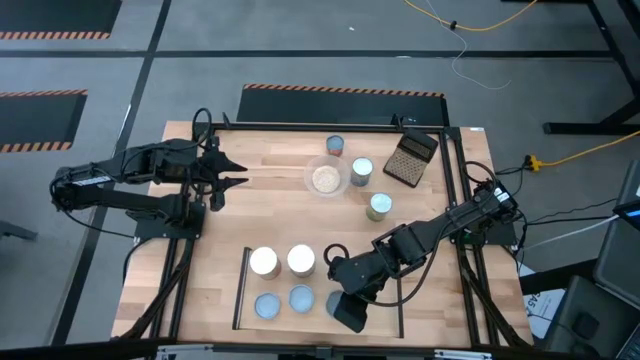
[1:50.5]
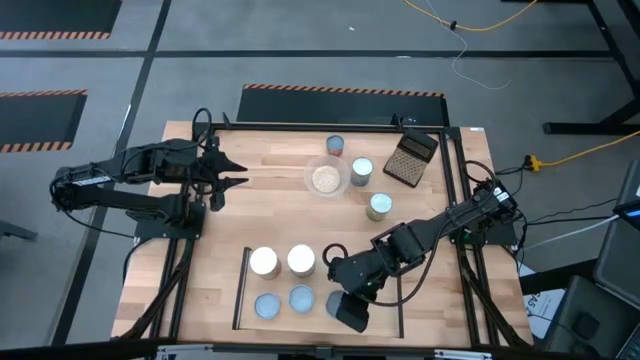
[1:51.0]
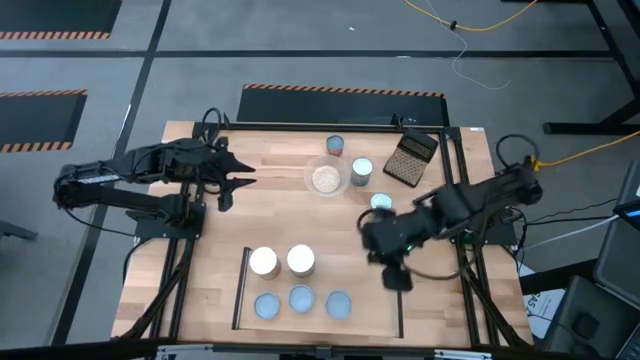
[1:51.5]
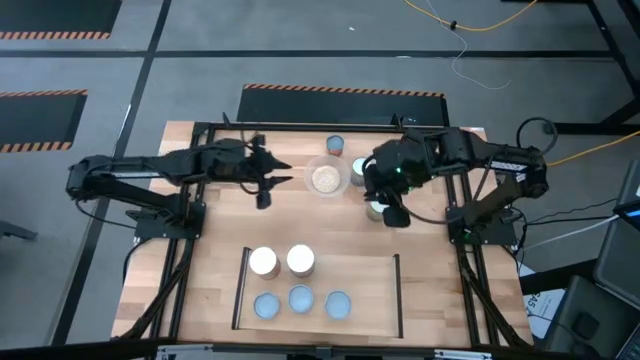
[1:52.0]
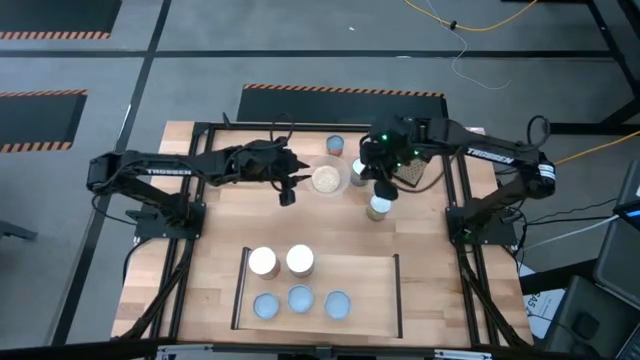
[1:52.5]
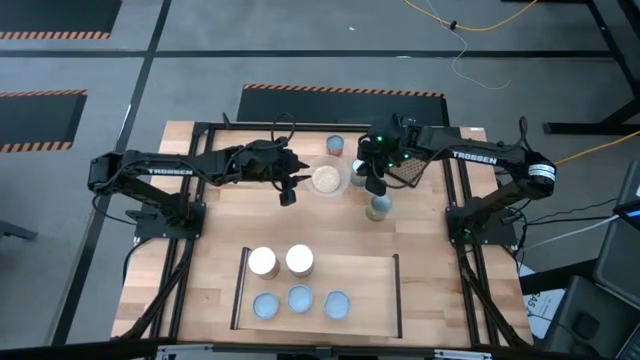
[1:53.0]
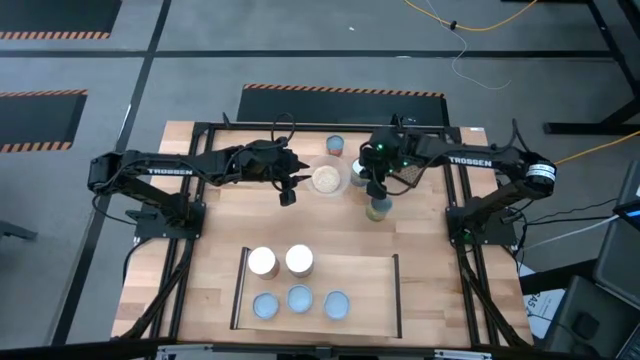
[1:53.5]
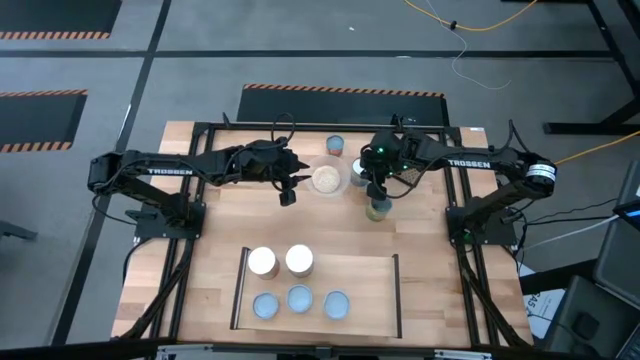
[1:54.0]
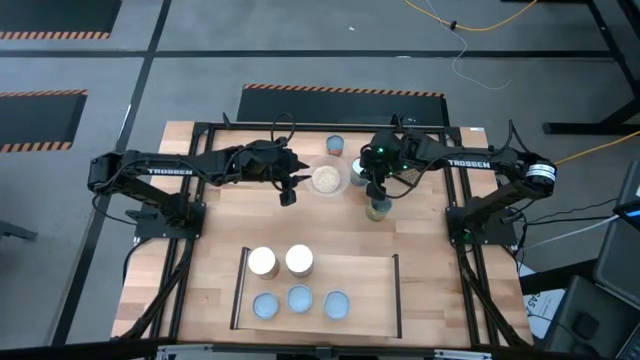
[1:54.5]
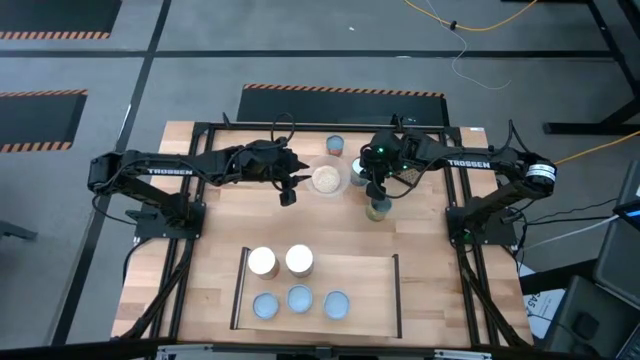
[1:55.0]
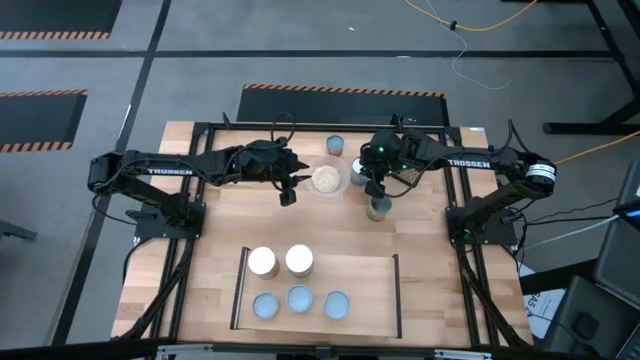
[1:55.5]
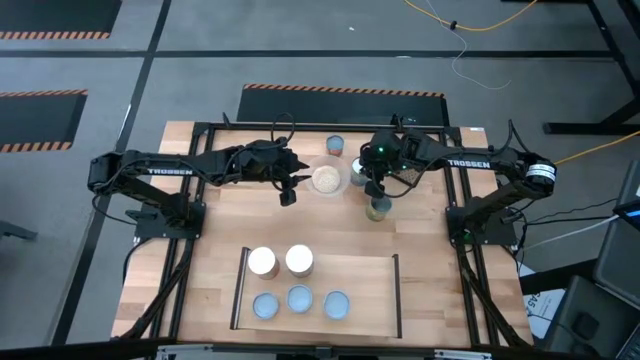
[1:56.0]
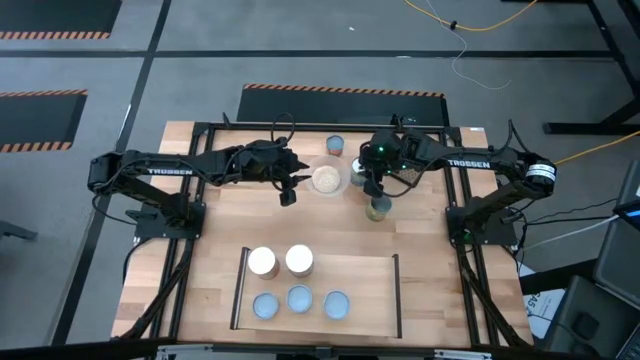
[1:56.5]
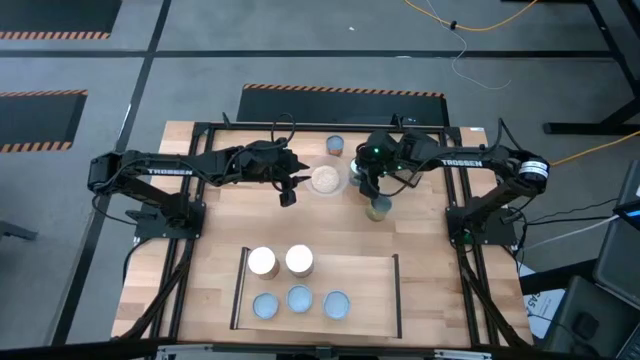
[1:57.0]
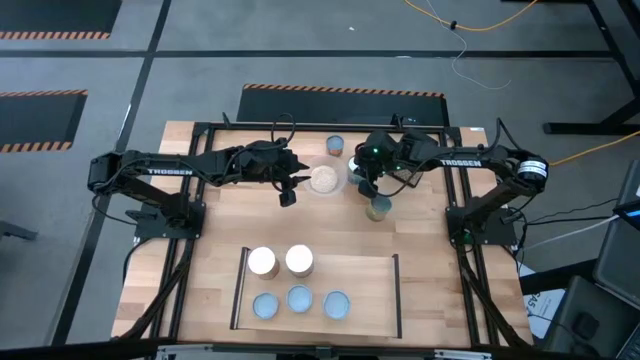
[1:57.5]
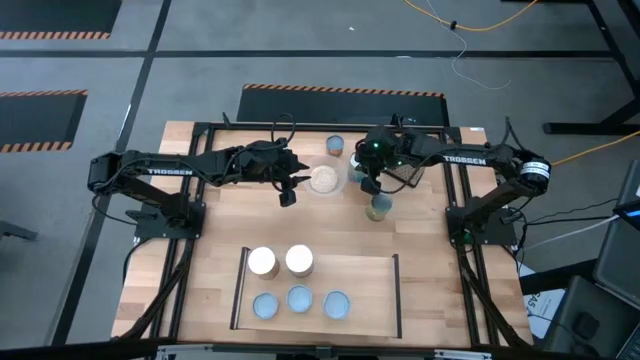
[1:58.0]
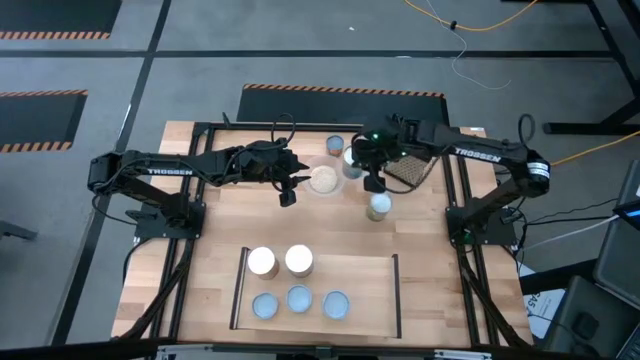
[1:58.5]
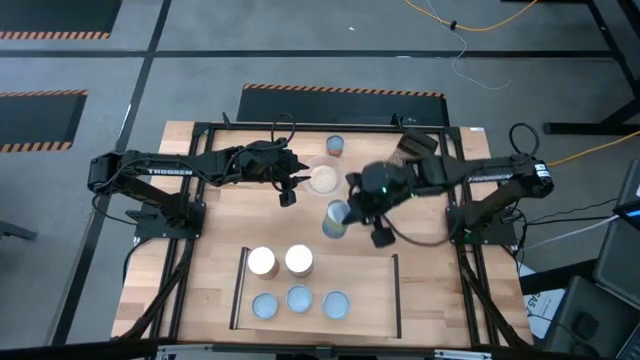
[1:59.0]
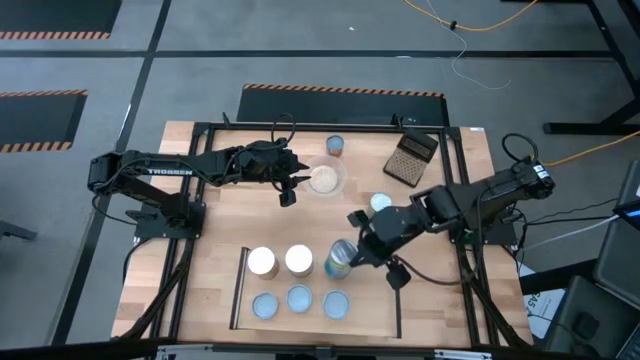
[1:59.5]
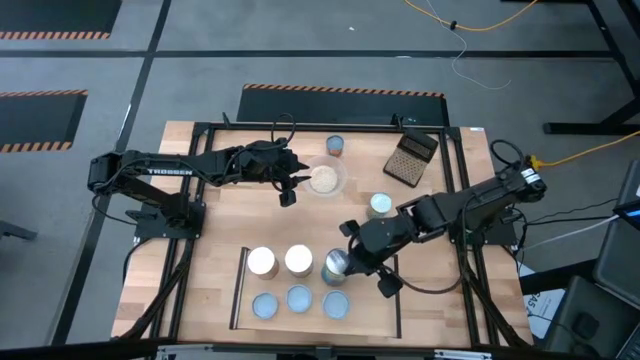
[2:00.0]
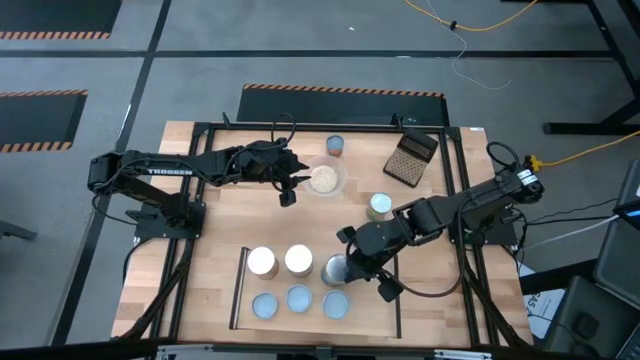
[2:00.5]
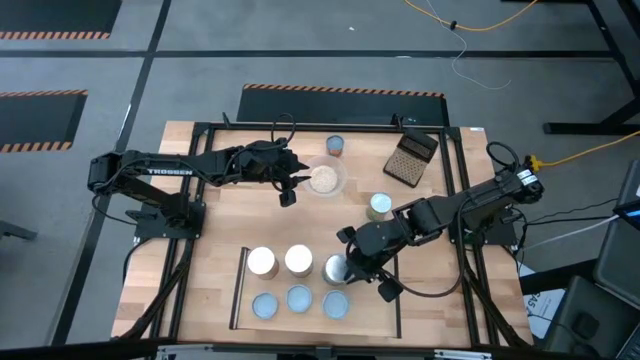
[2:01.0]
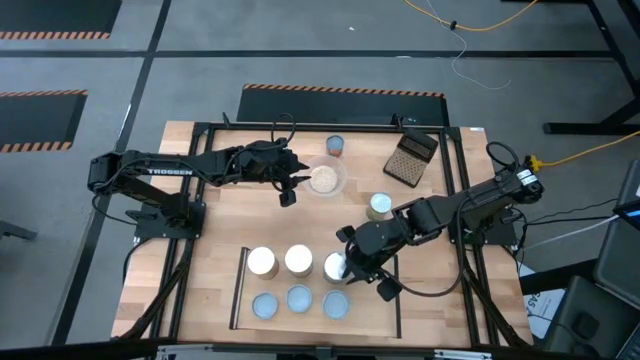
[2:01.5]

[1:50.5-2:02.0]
Task: Pick and place cans onto a shelf
Put the canned cherries on the shelf

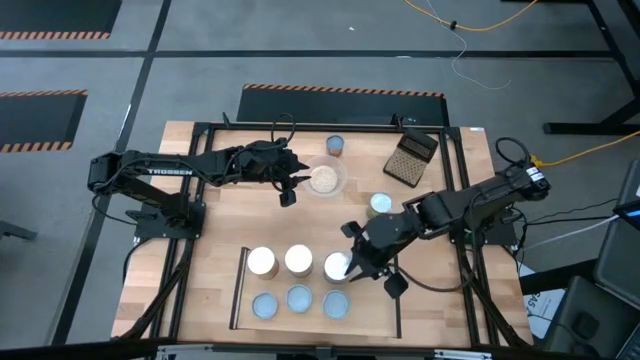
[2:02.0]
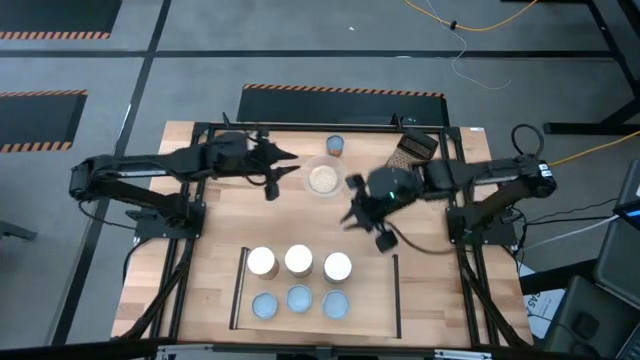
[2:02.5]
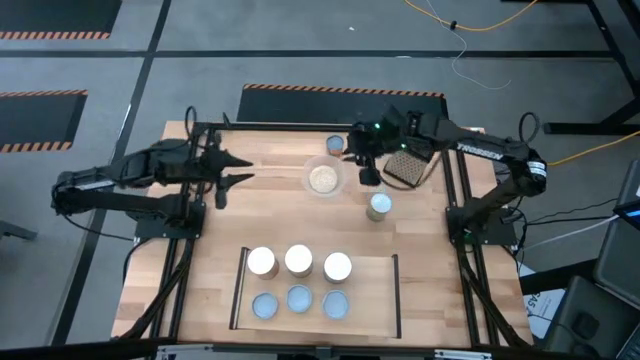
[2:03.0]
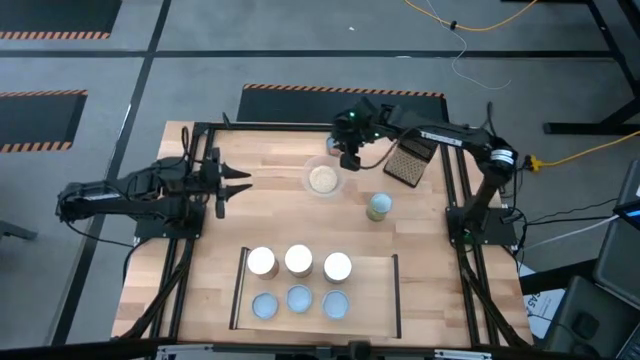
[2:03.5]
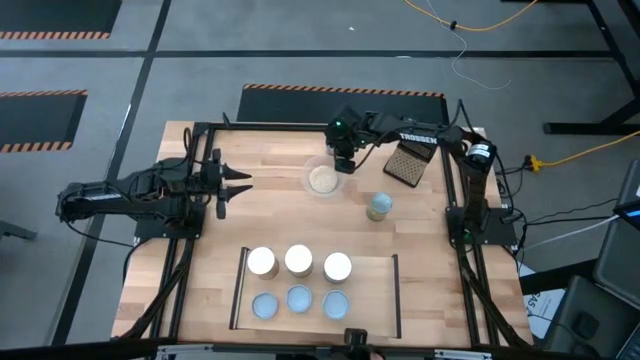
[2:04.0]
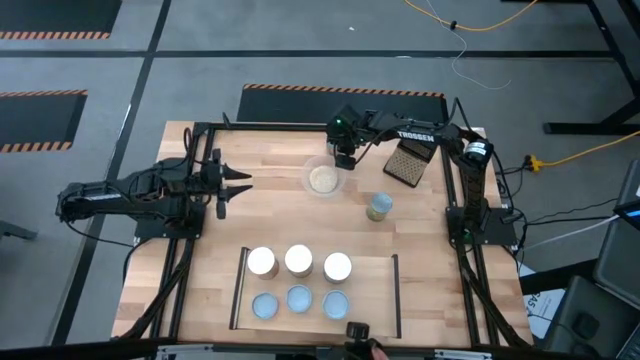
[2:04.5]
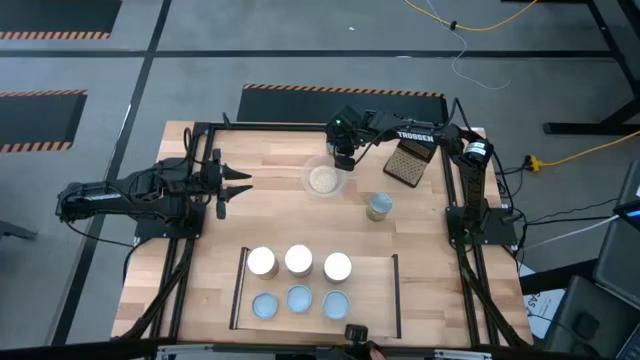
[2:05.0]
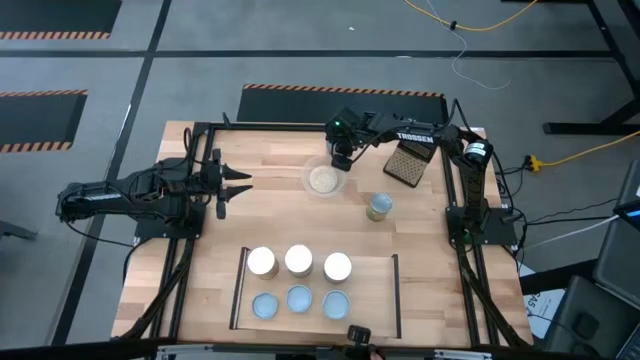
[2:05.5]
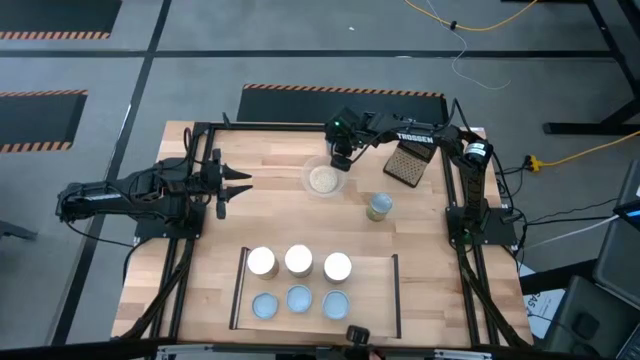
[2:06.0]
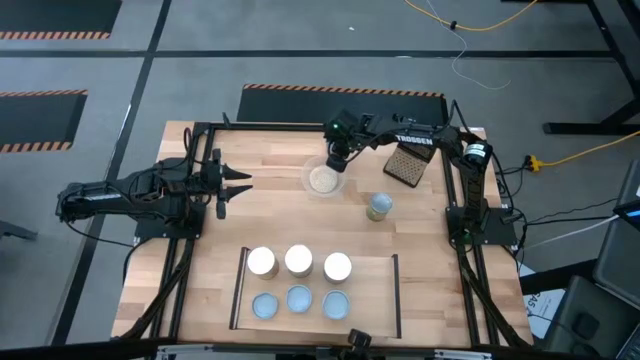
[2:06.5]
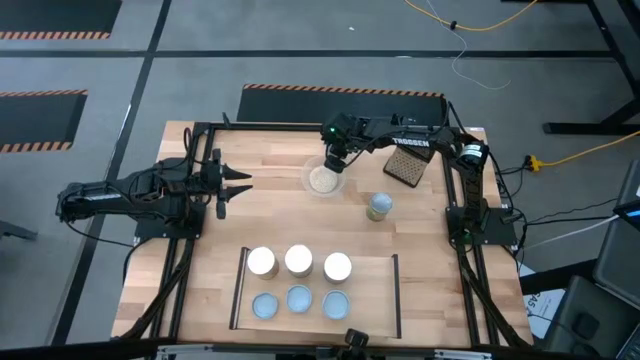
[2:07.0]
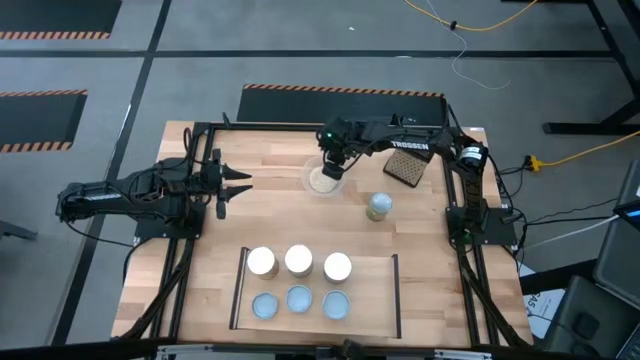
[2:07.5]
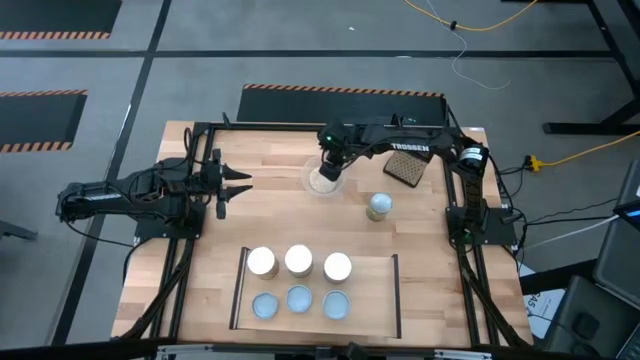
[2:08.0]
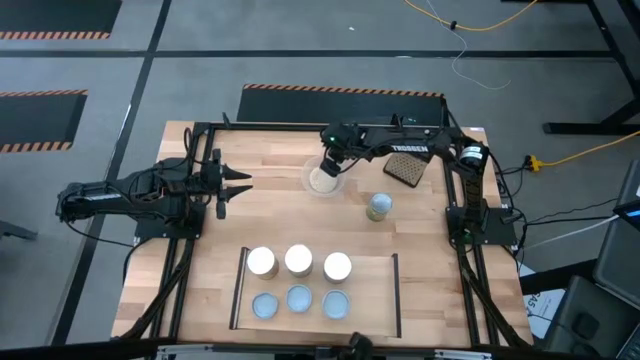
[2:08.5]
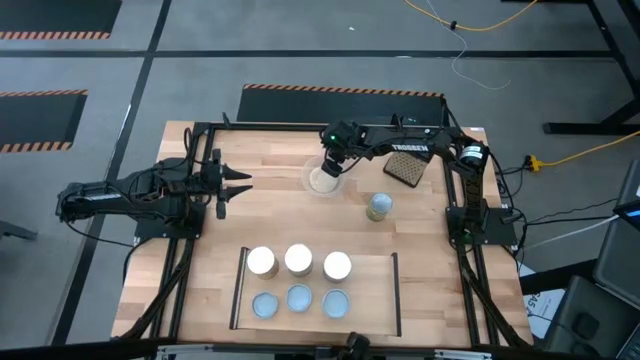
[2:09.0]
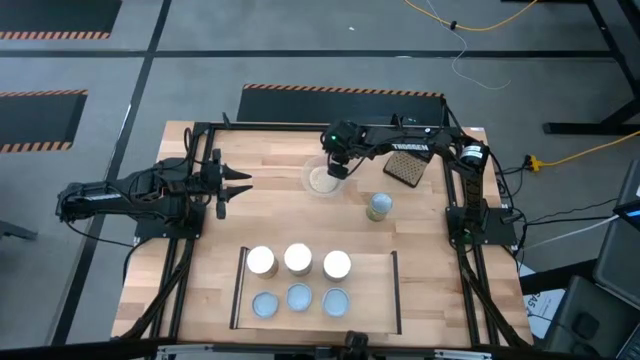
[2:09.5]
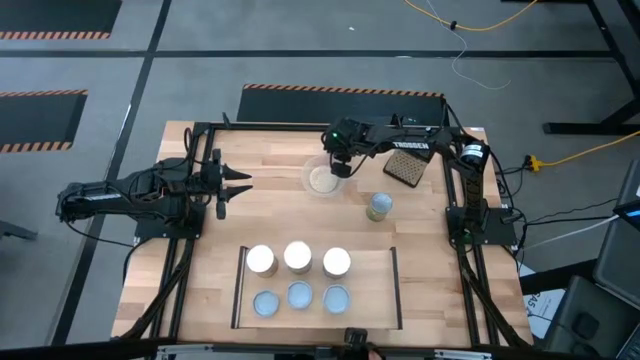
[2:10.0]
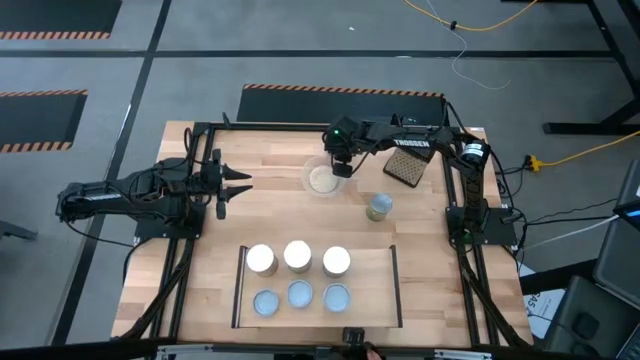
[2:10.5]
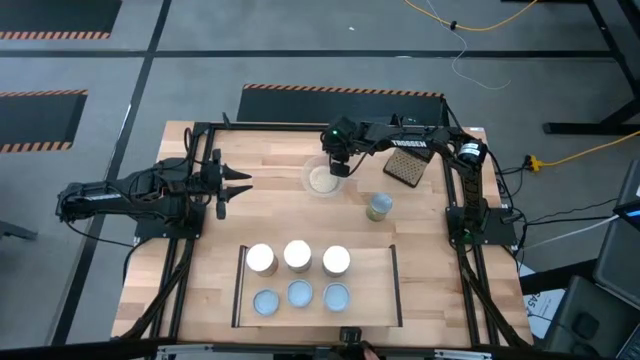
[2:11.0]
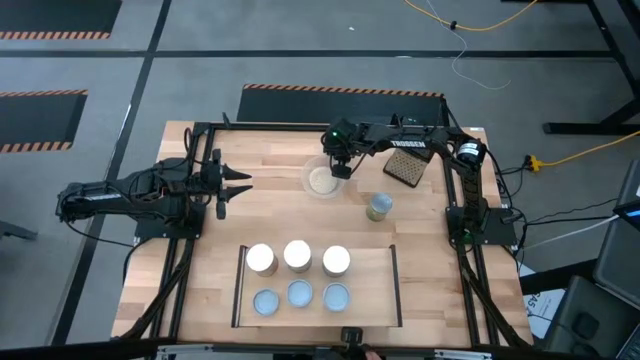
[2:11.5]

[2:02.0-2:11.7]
Put the small canned oranges on the shelf

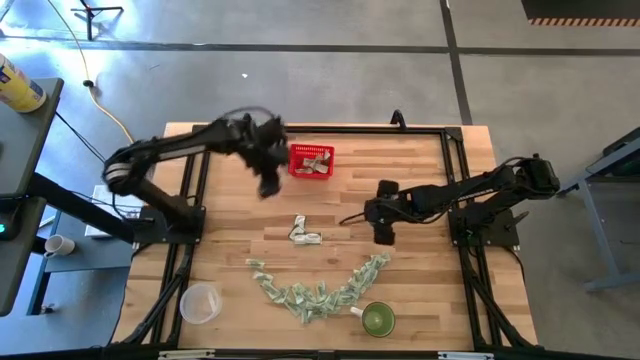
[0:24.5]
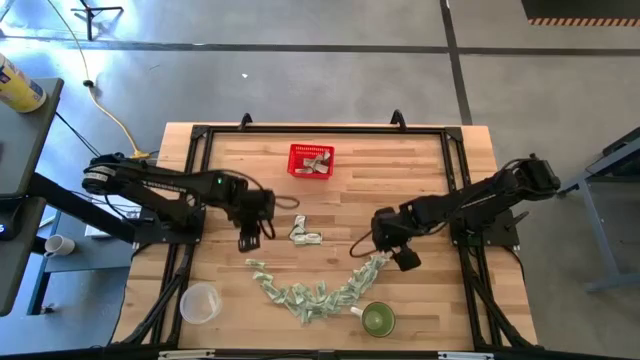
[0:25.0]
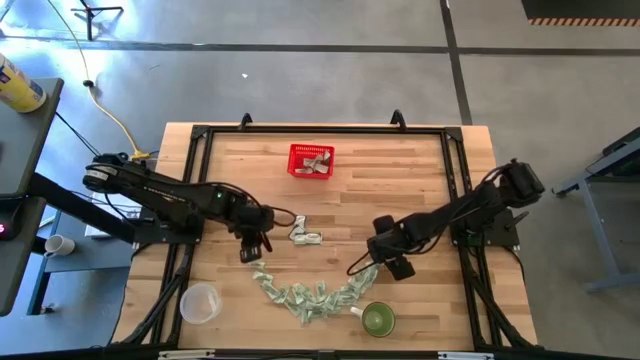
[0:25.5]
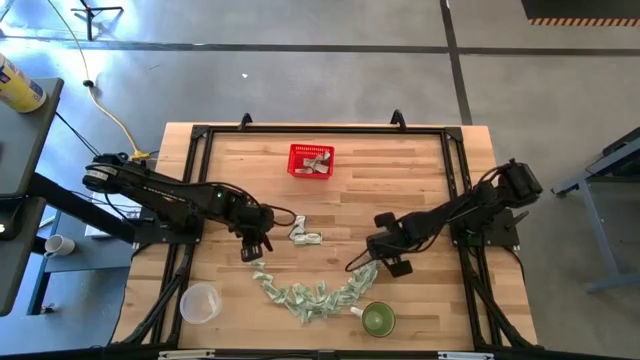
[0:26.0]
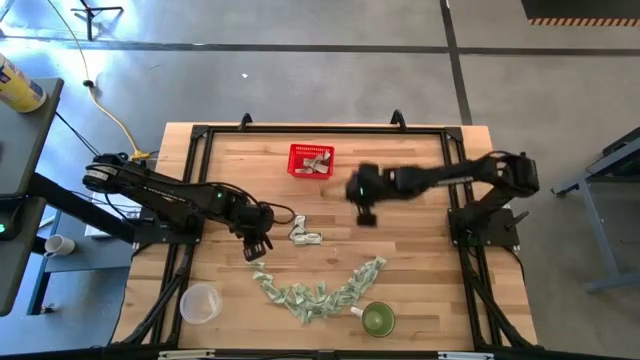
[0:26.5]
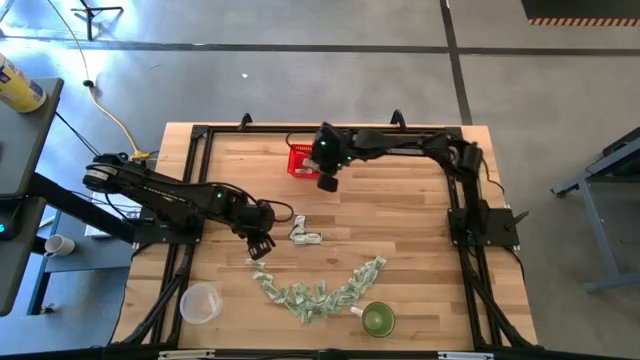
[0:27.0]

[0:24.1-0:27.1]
Task: Pick and place items into bin
Put the light green stevia packet into the red bin
